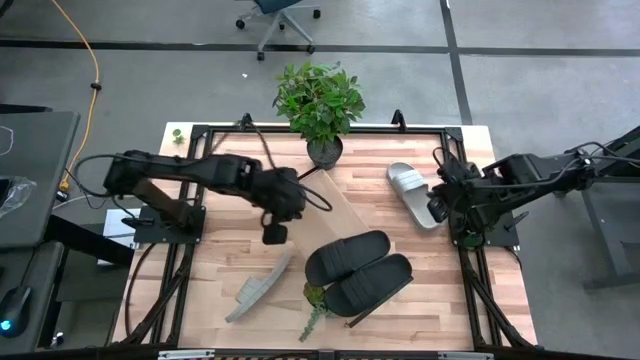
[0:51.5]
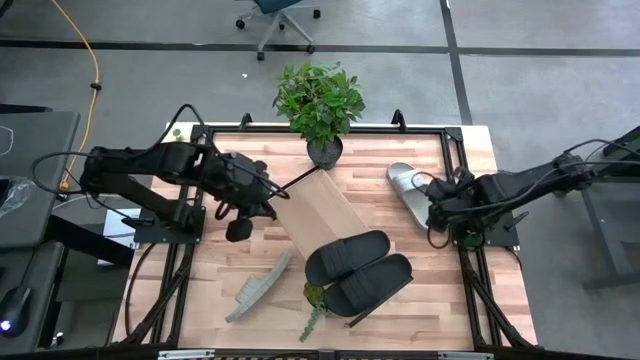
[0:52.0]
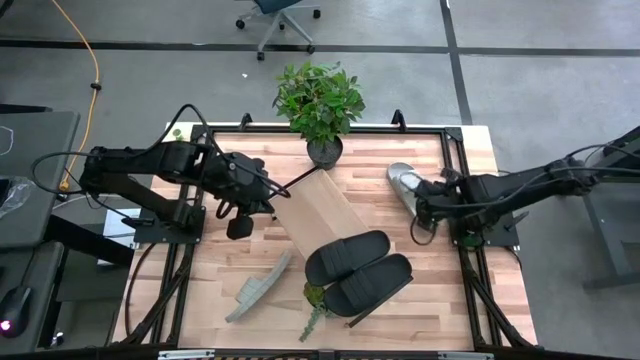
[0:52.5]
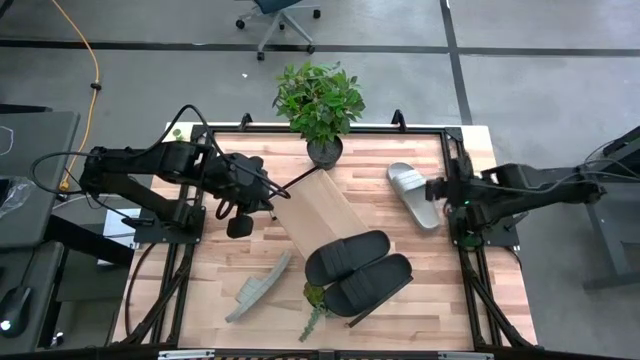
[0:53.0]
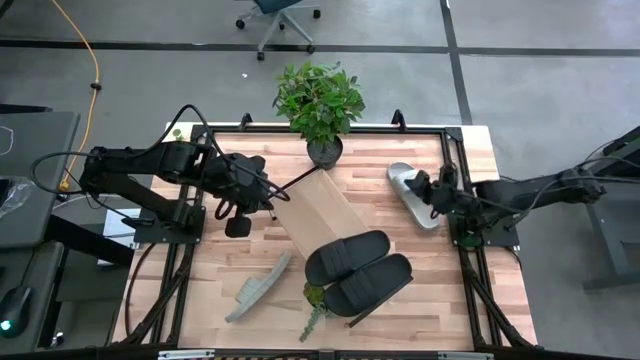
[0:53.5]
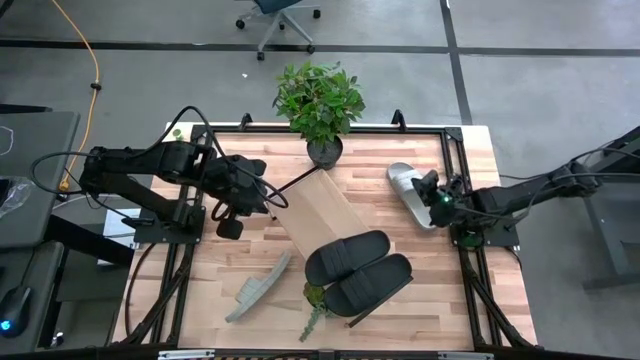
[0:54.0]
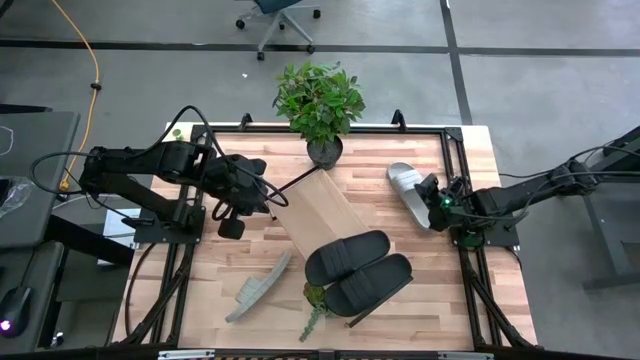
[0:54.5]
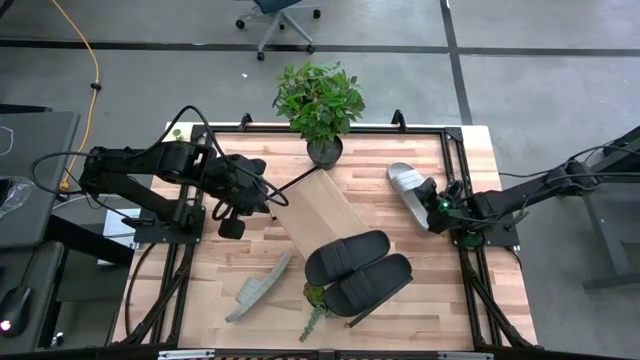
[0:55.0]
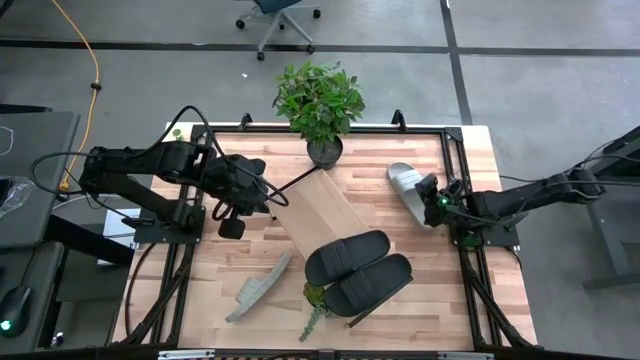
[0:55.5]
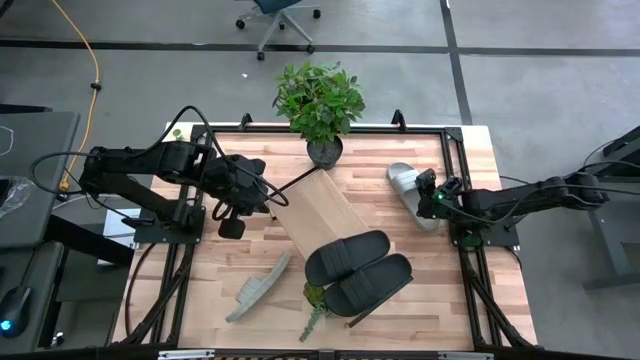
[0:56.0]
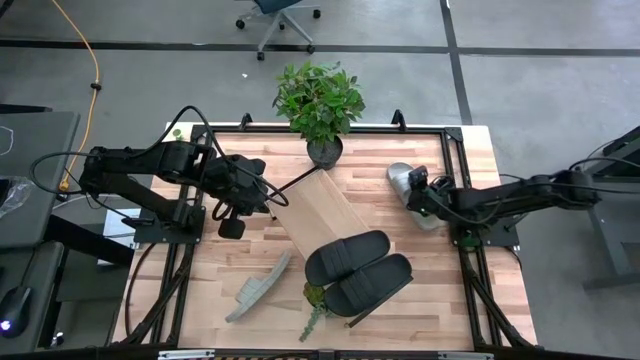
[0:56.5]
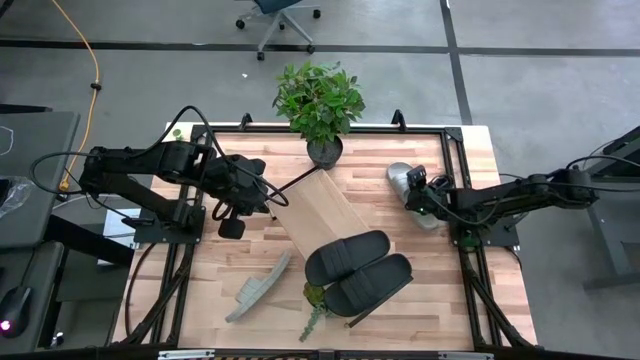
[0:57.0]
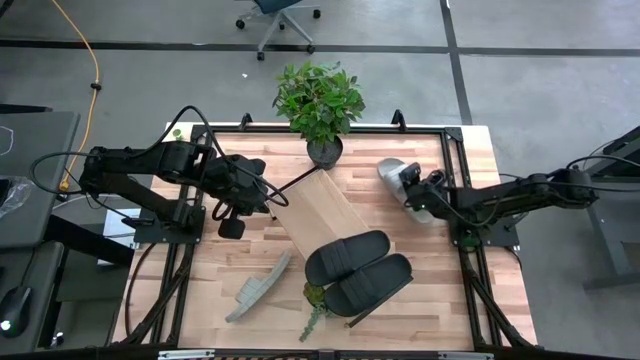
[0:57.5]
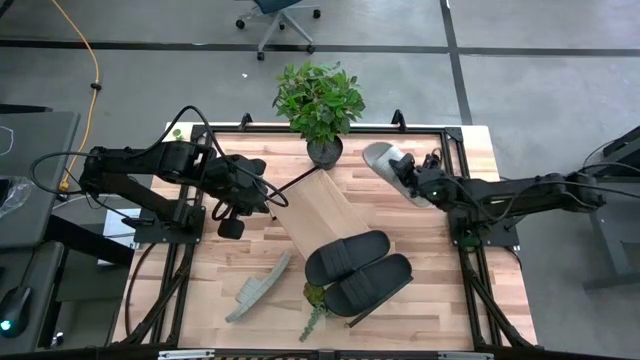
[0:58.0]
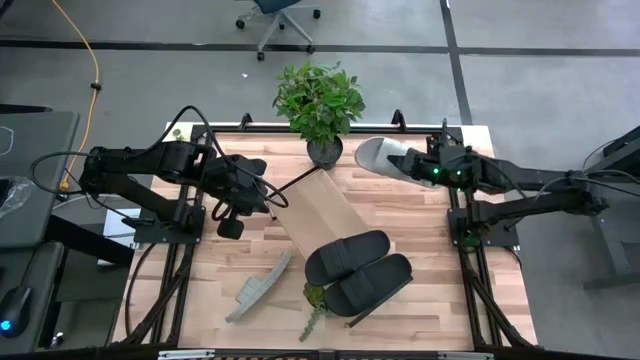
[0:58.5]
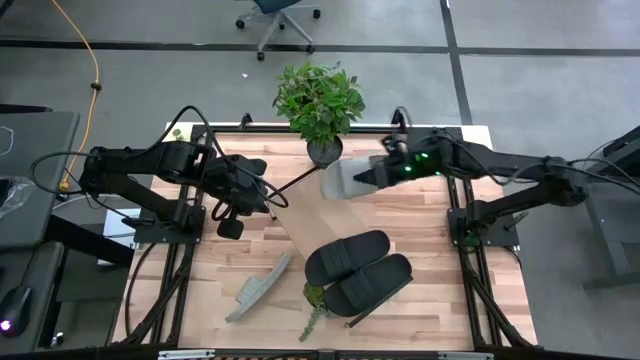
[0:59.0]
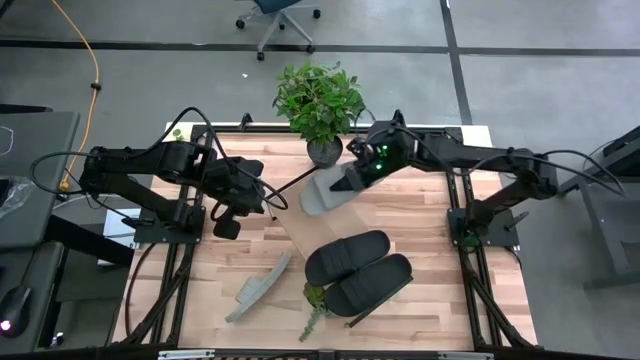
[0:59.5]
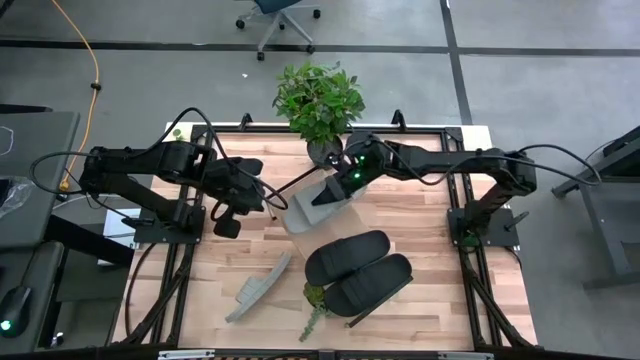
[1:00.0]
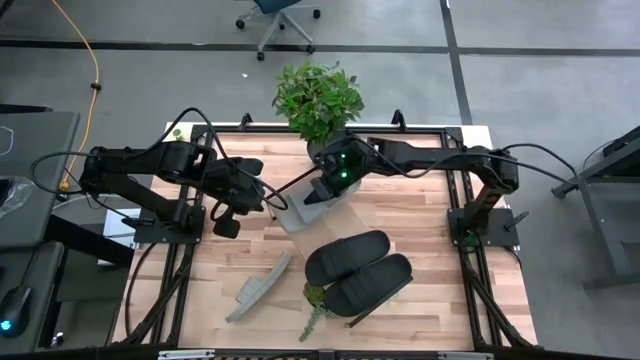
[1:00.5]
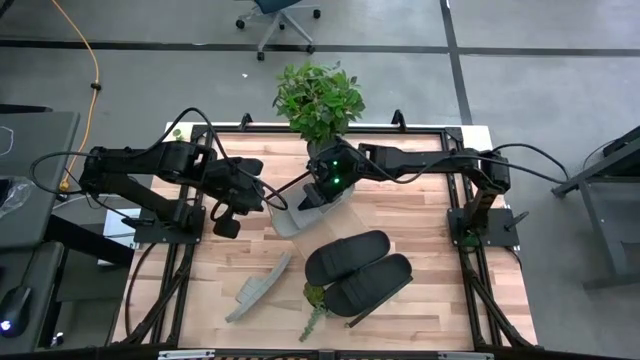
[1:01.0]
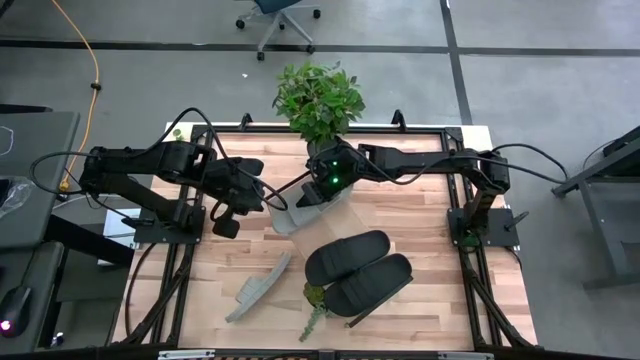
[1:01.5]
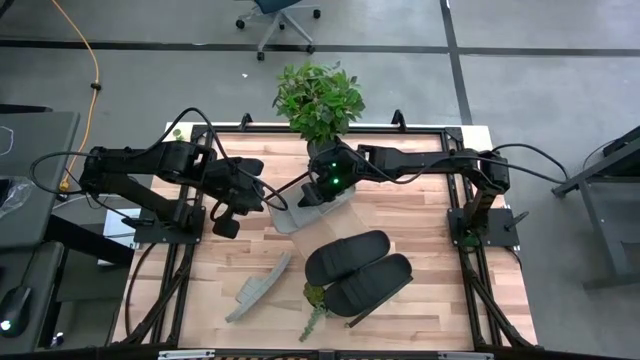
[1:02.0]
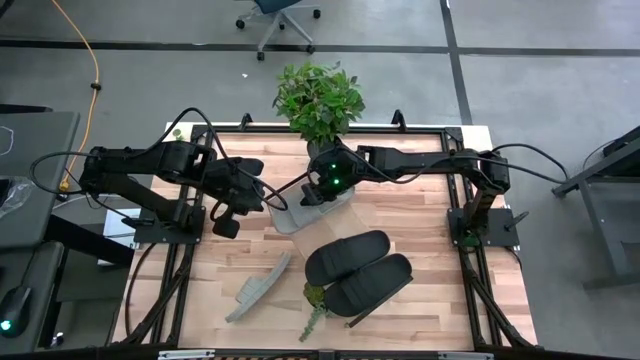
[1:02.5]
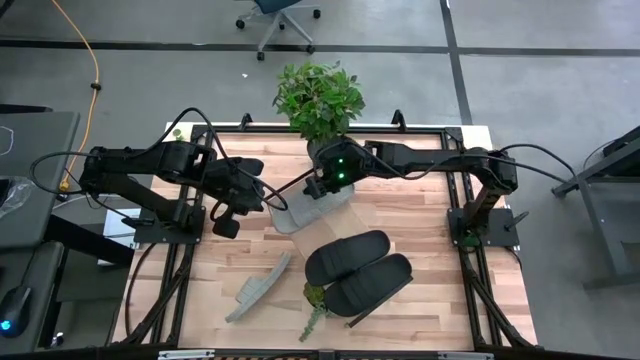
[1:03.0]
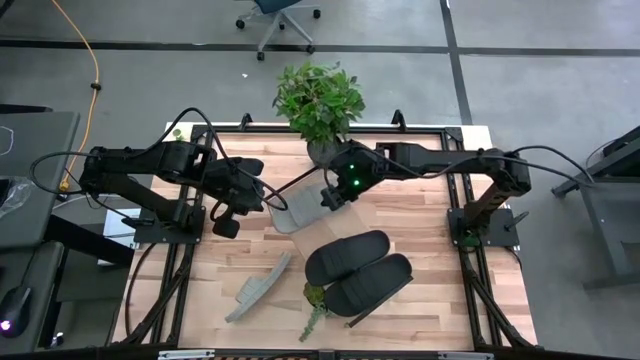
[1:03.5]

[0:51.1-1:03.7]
Task: Pick and place slides into the shelf
Put the right gray slide on the shelf

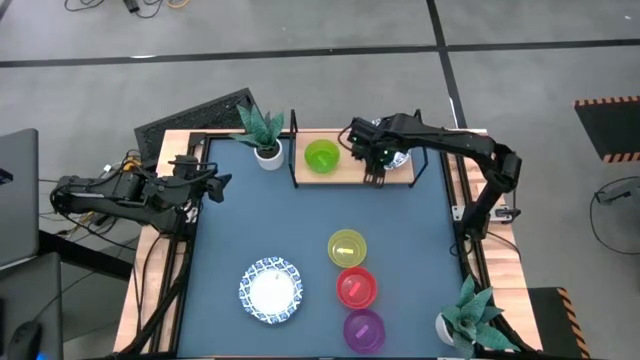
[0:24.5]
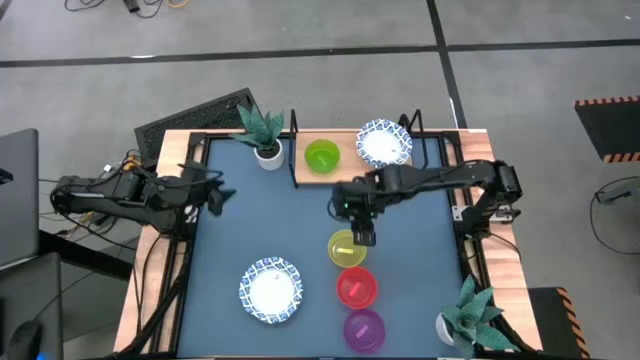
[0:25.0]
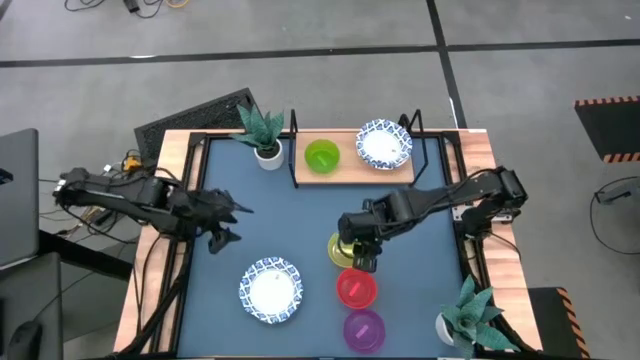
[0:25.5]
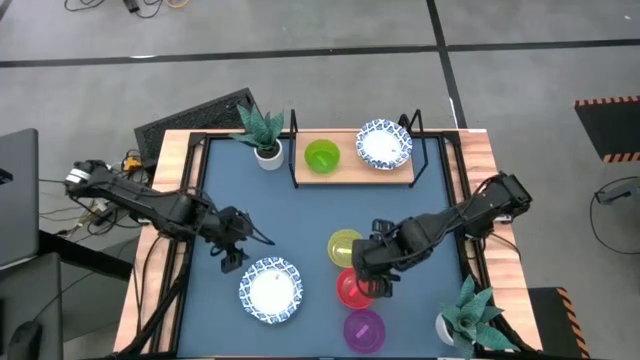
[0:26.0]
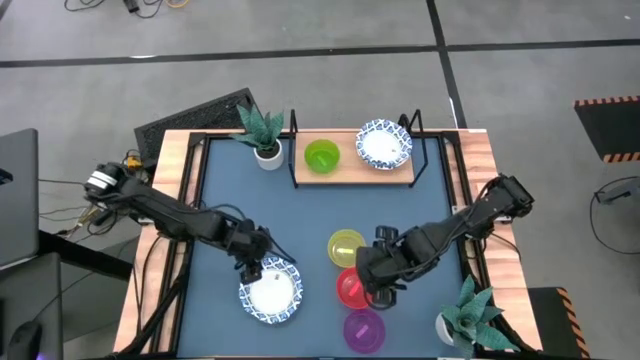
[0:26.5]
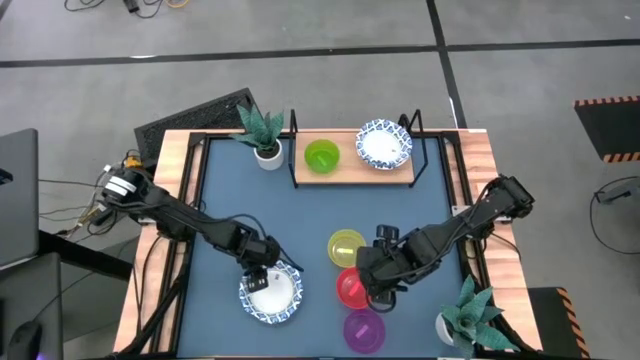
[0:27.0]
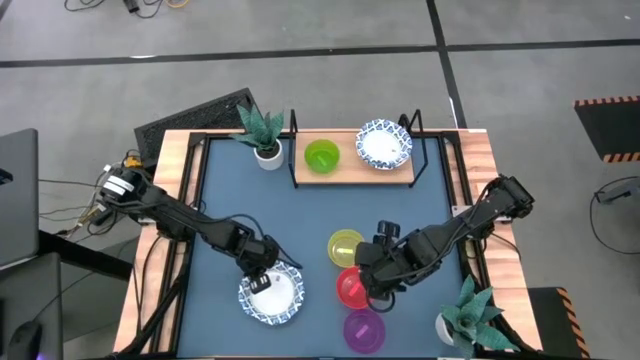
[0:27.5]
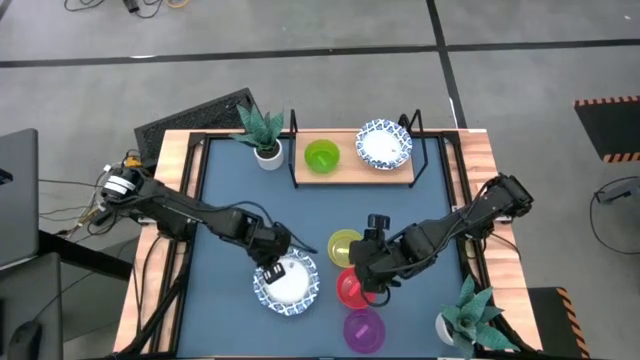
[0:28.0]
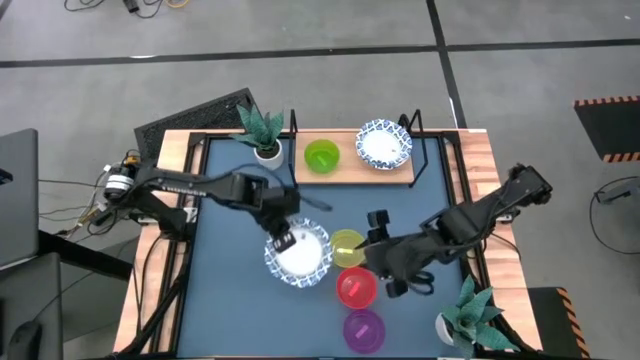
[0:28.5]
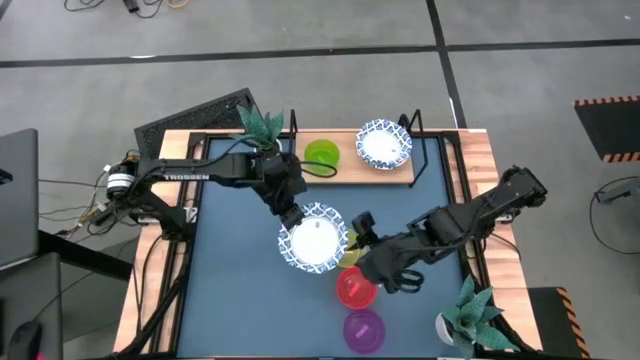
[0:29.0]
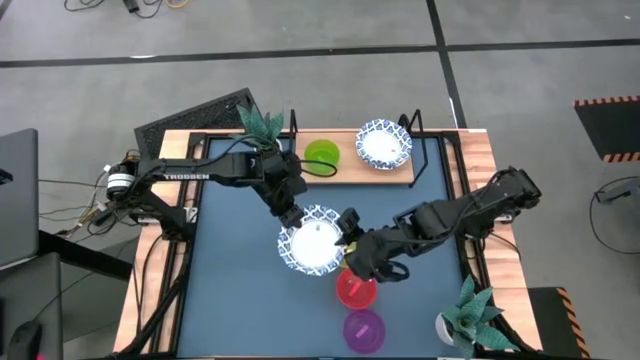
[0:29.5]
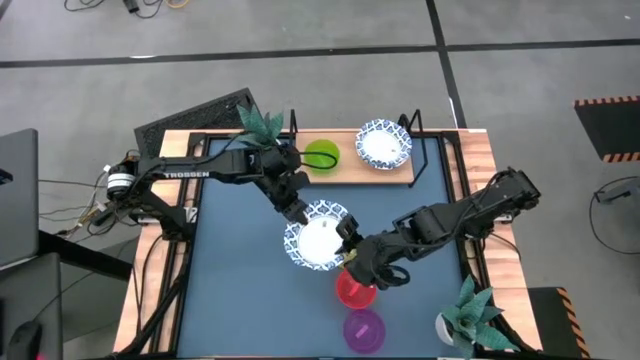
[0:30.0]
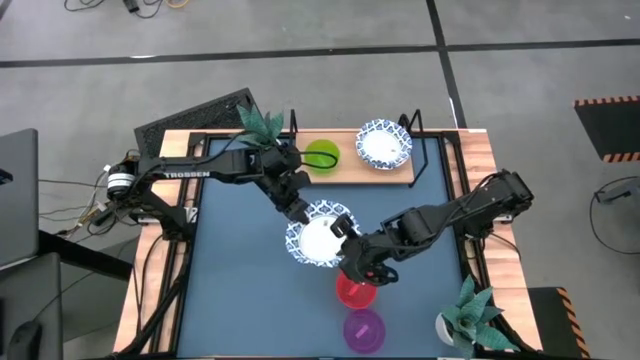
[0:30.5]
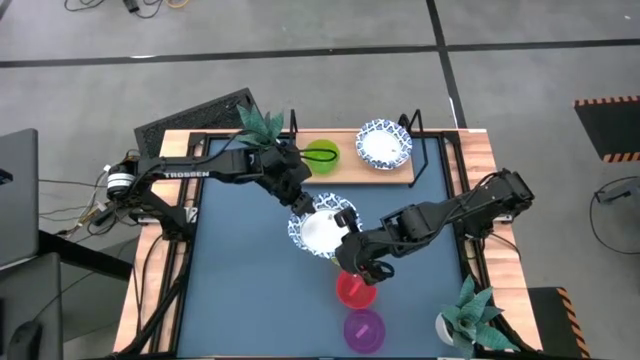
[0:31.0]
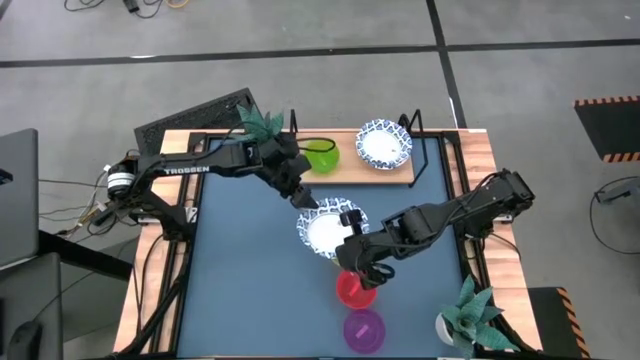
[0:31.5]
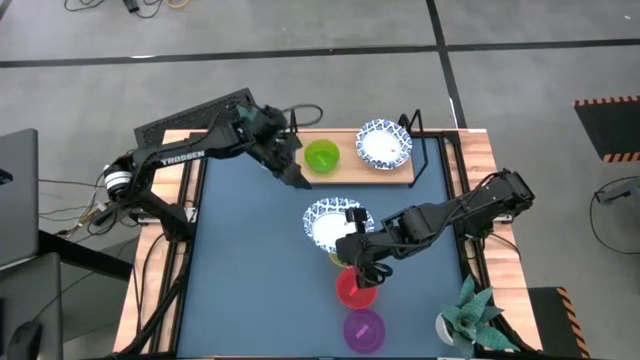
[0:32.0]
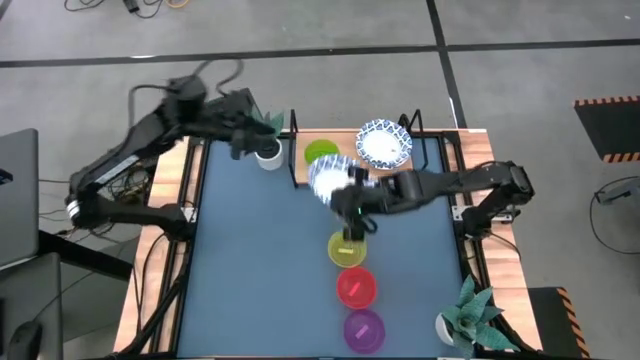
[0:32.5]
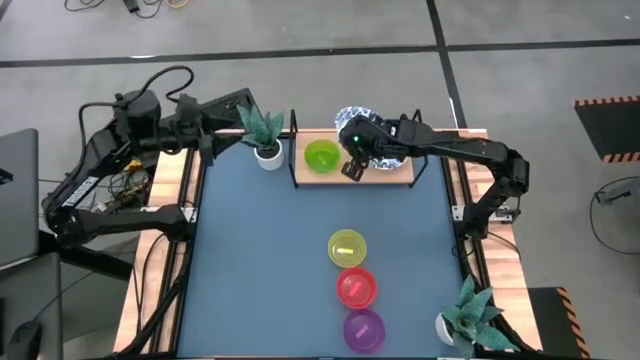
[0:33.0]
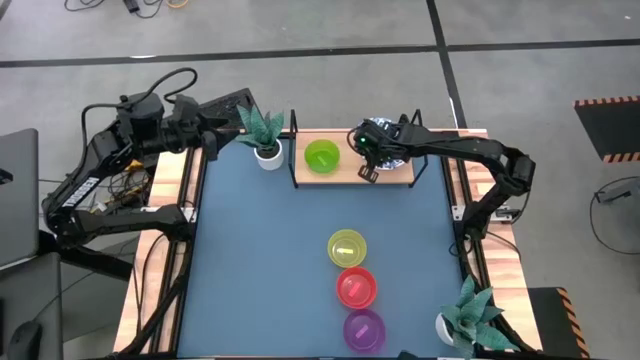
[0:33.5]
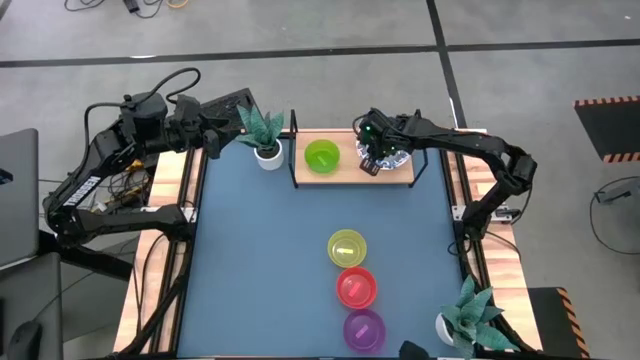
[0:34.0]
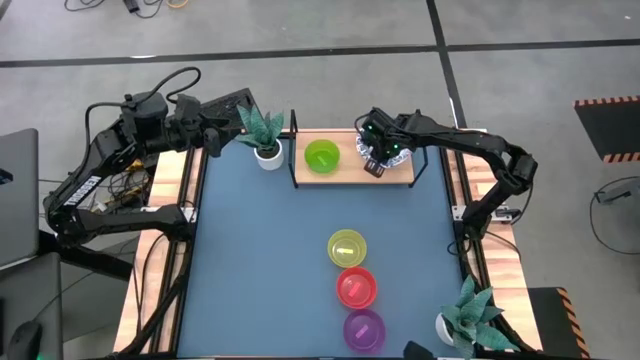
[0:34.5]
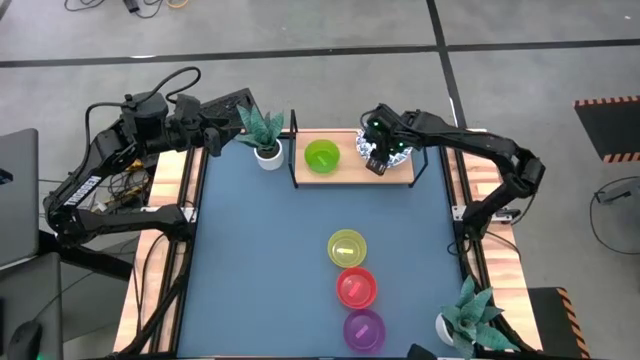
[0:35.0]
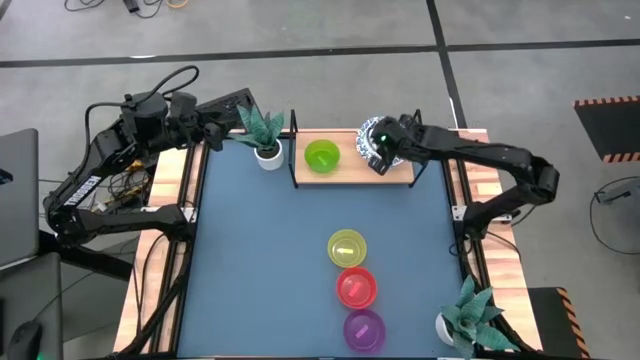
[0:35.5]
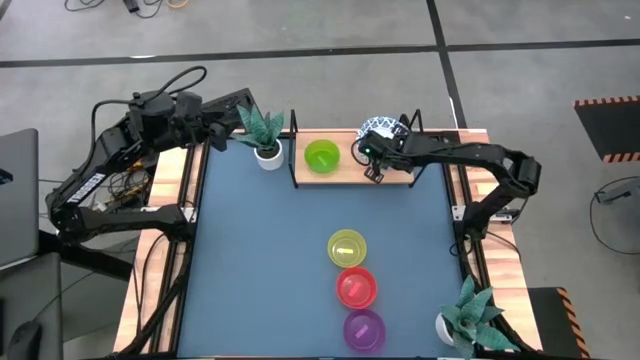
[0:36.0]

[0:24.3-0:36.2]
Task: Place and stack bowls onto a shelf
Stack the white patterned bowl on top of the white patterned bowl on the shelf
